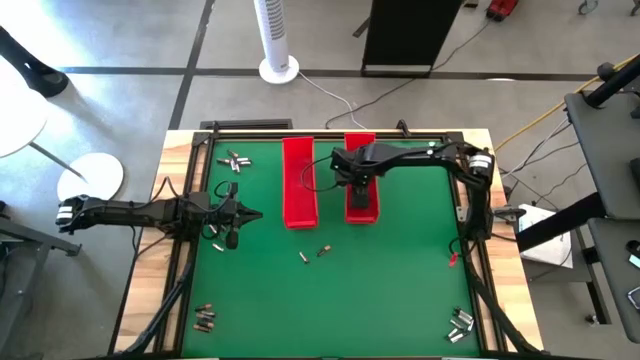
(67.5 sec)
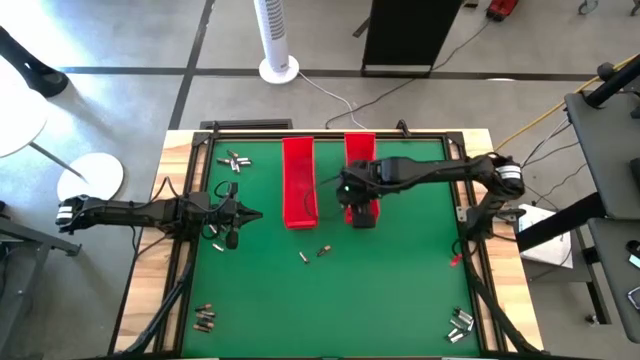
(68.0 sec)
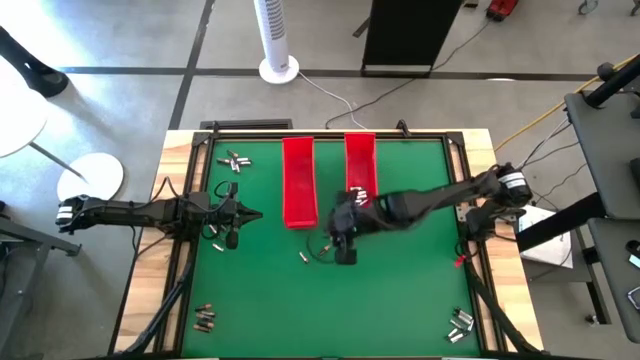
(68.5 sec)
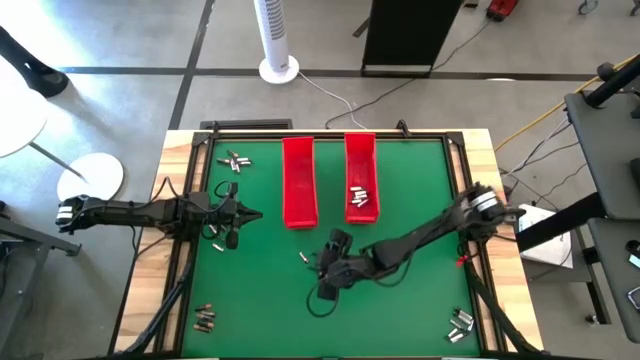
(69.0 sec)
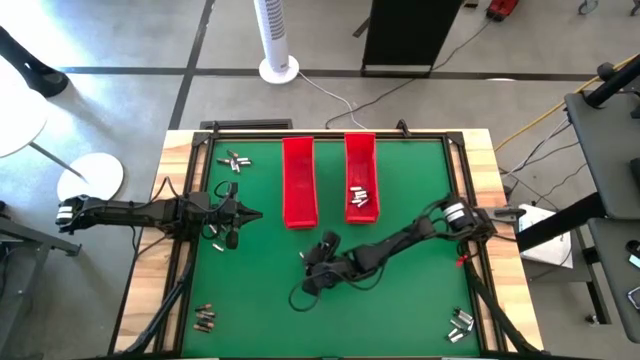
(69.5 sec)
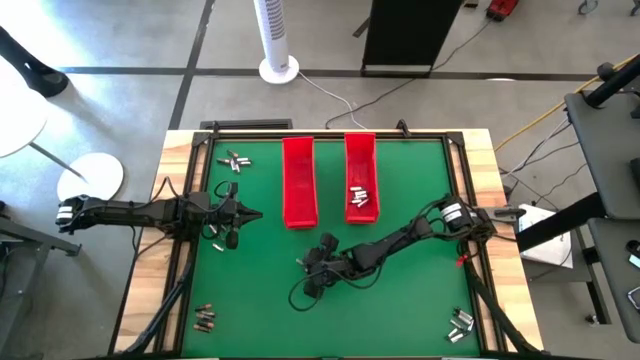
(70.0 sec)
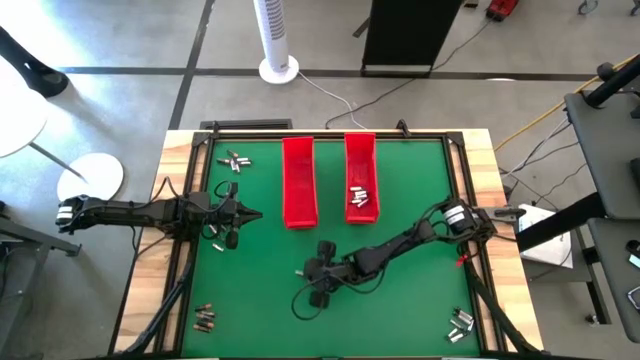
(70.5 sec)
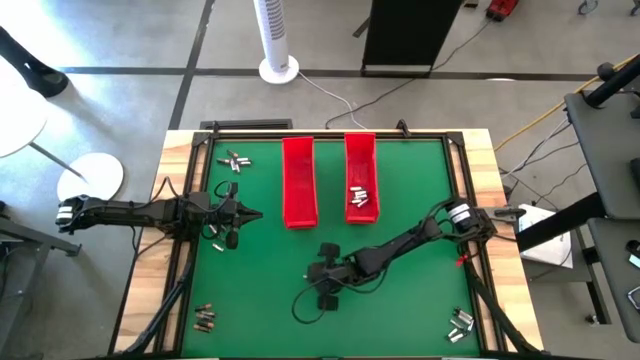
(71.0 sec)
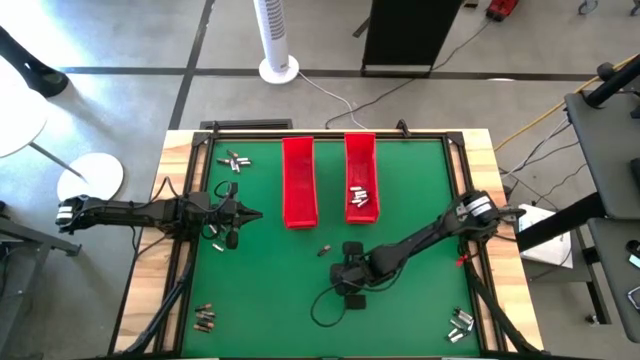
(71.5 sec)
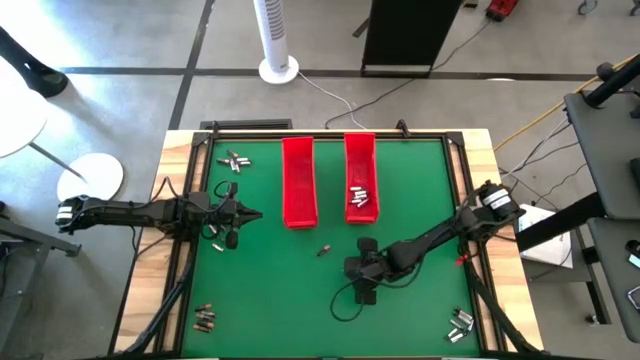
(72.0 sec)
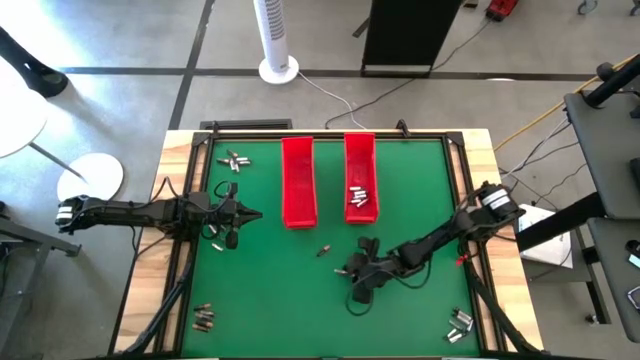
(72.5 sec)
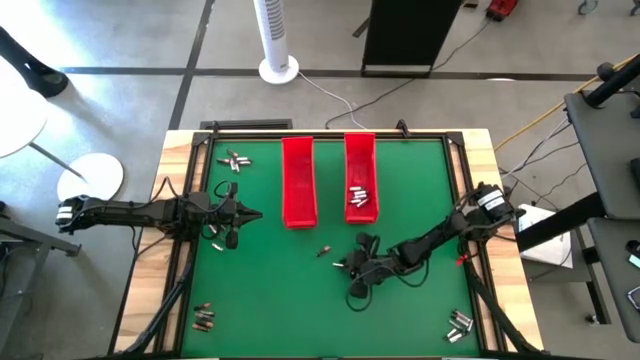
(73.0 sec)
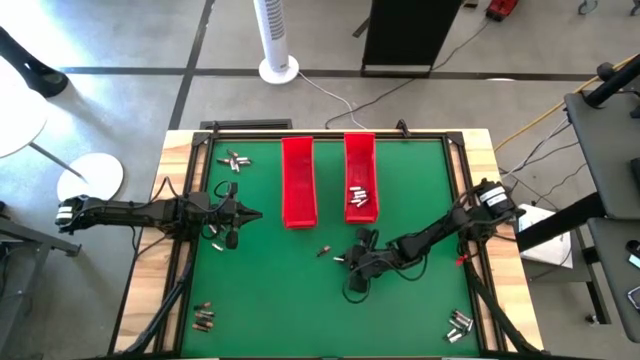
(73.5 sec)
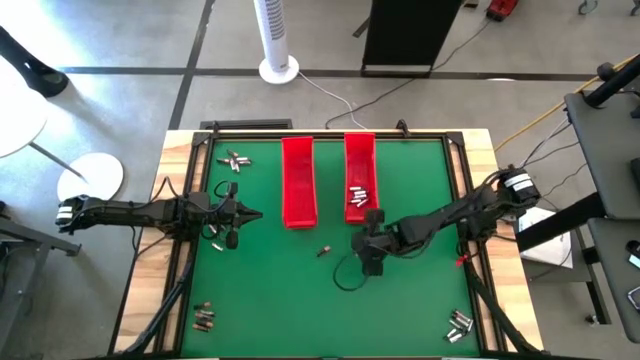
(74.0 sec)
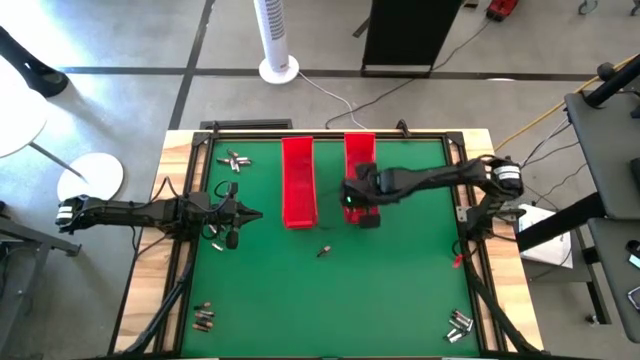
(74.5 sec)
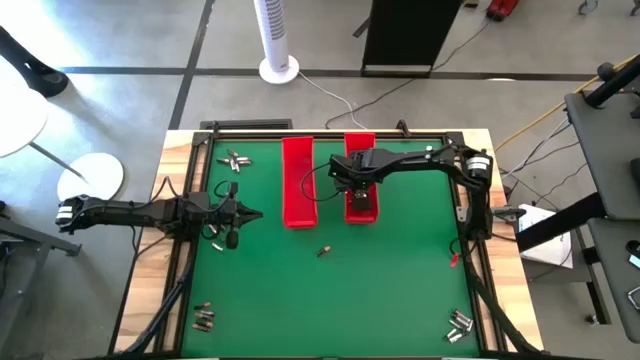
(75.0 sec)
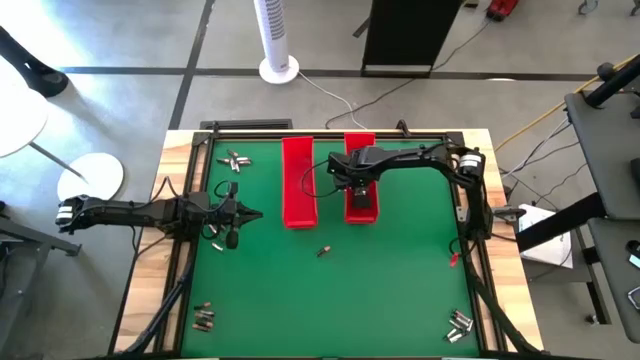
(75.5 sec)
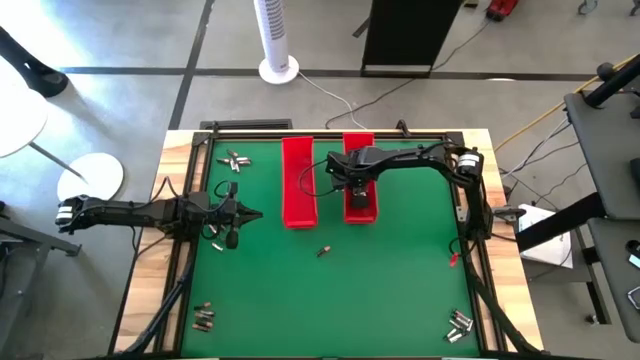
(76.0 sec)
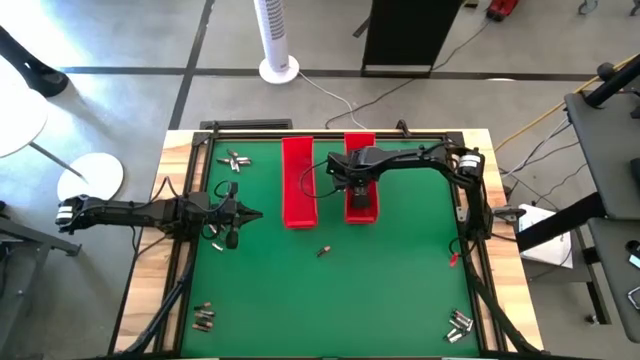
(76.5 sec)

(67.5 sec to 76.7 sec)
Task: Sort batteries
Put the silver battery into the right red bin

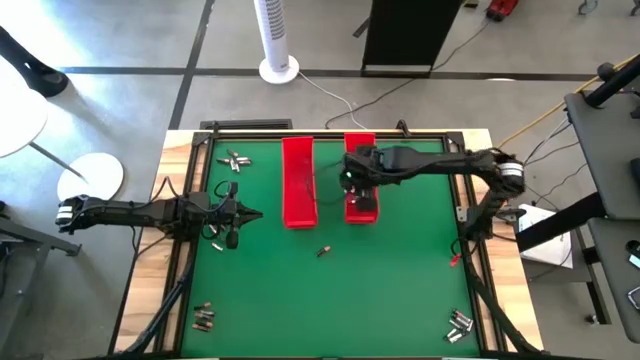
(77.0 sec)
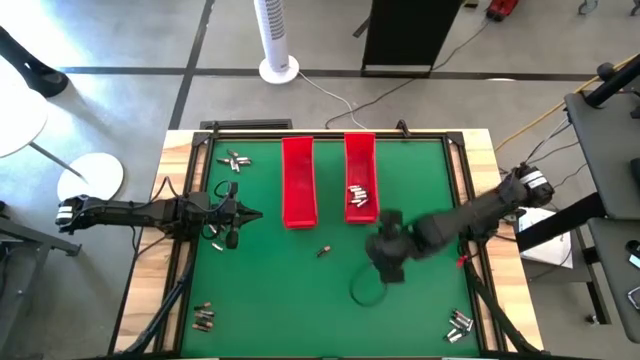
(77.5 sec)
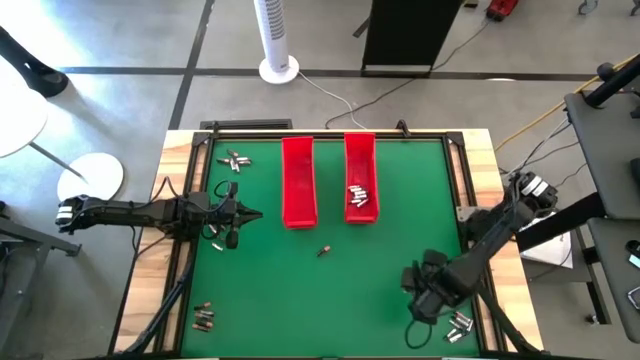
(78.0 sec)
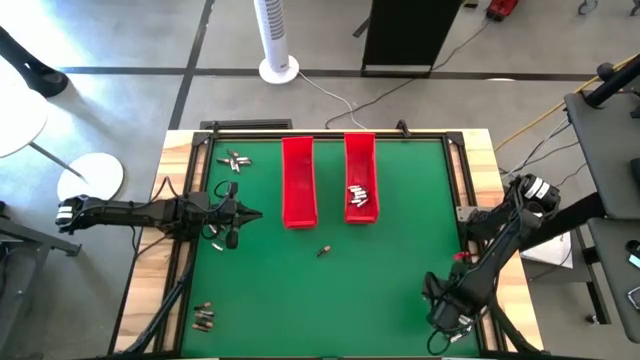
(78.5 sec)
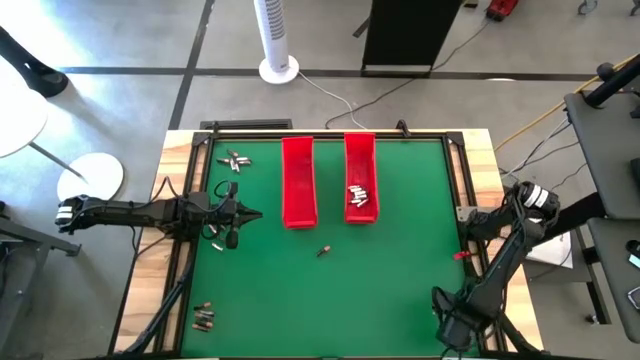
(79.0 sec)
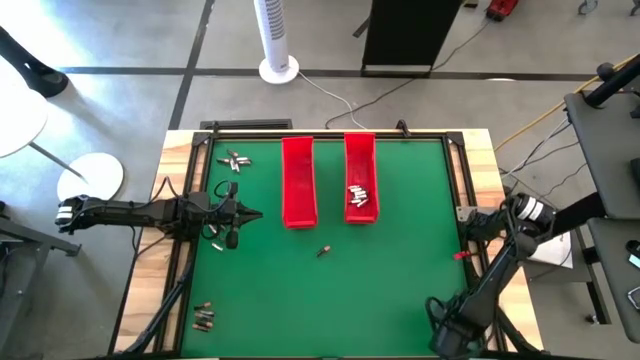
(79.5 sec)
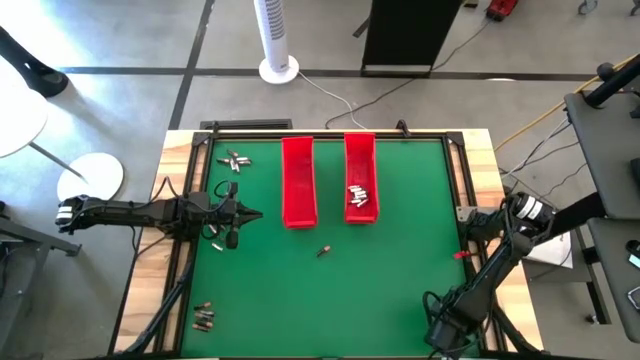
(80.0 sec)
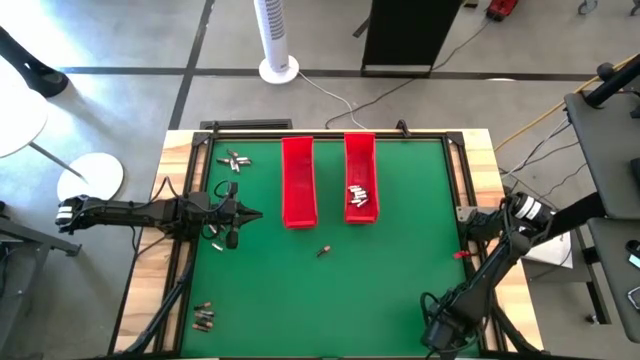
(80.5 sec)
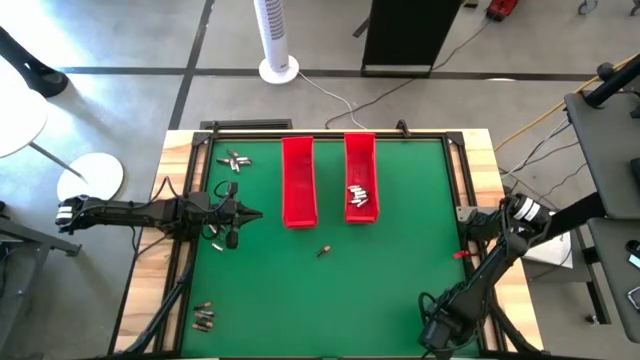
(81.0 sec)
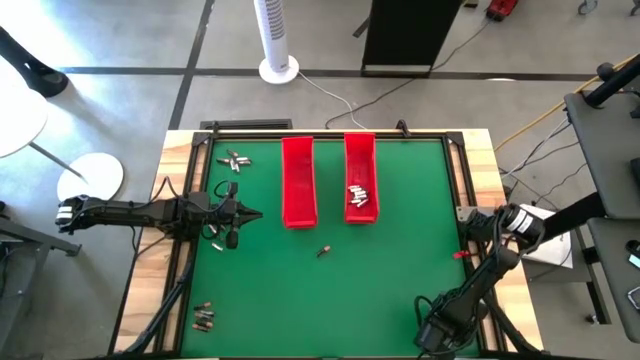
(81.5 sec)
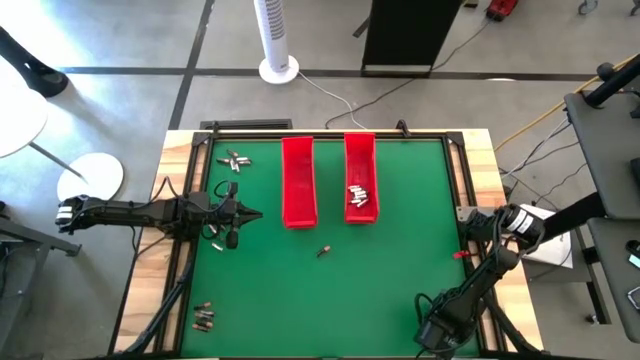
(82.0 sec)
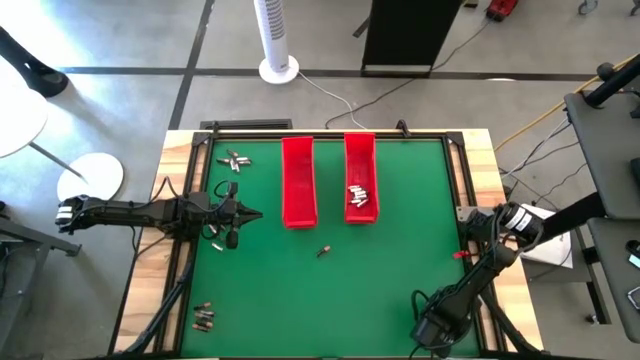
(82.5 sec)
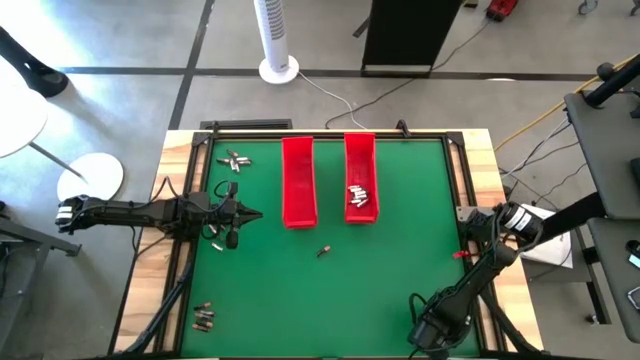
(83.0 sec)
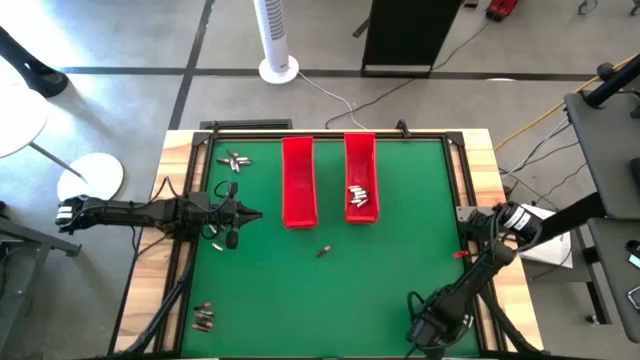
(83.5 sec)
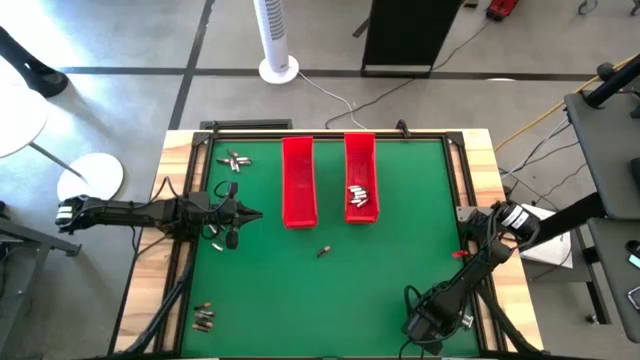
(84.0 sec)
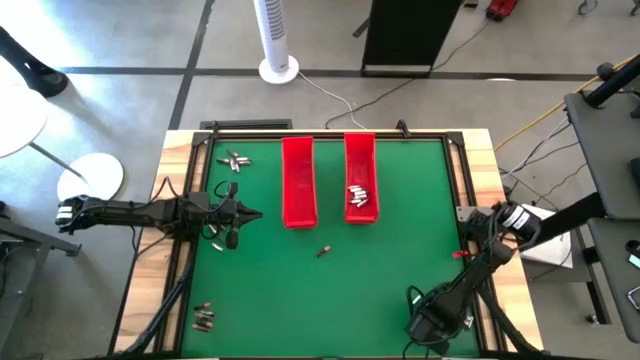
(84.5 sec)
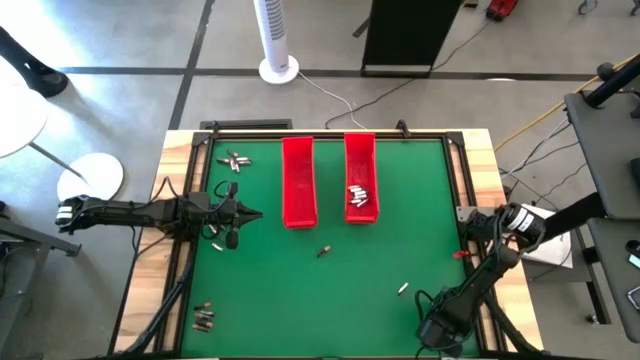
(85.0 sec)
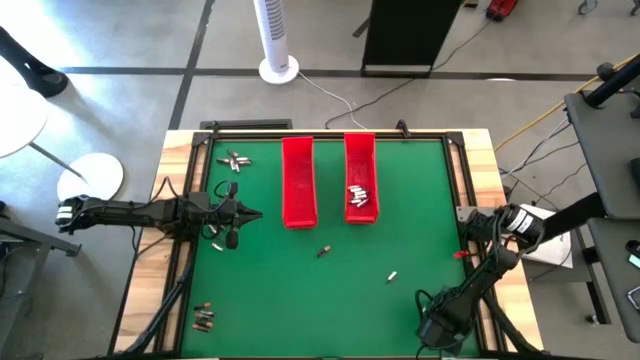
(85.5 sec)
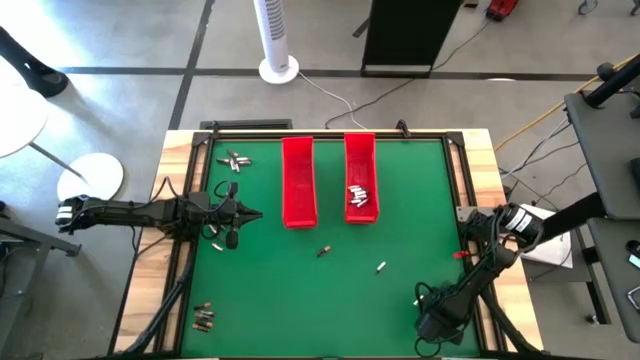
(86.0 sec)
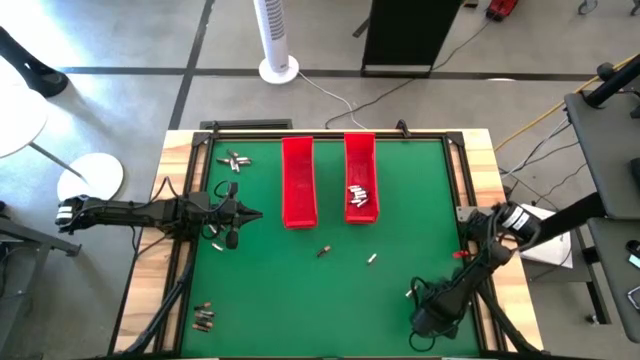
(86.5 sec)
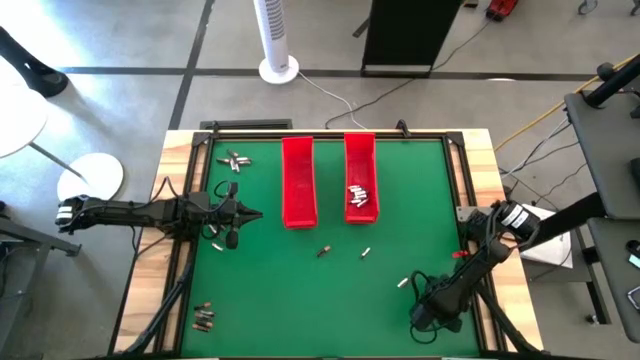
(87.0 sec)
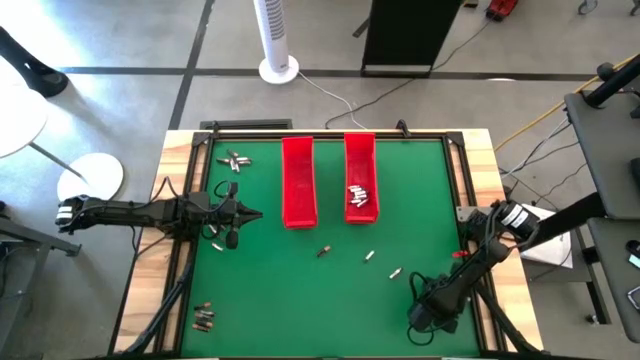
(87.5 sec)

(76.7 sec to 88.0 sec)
Adjust the silver batteries
